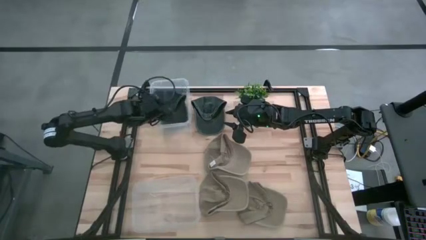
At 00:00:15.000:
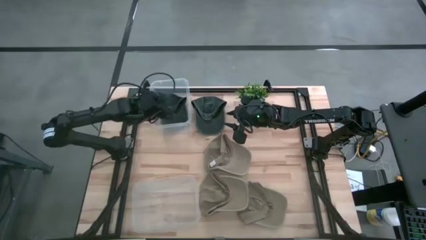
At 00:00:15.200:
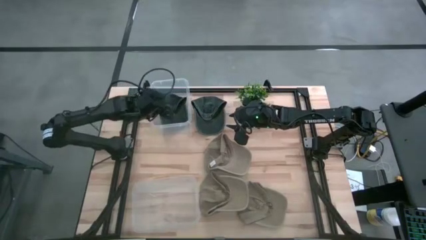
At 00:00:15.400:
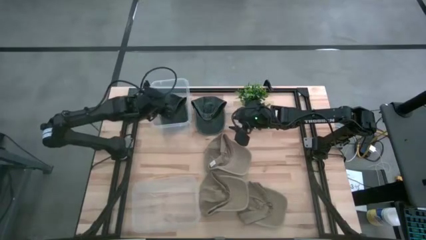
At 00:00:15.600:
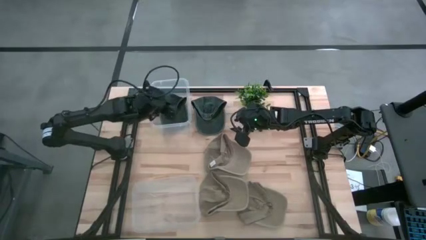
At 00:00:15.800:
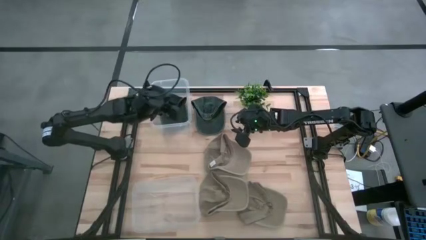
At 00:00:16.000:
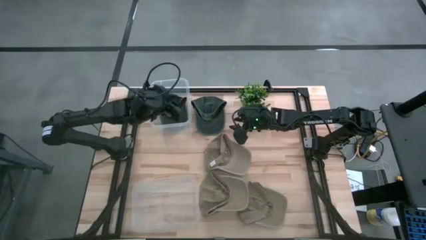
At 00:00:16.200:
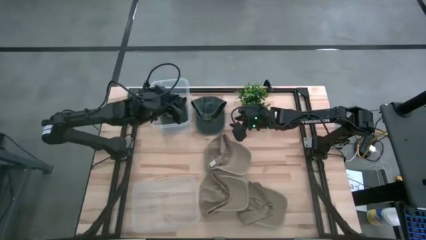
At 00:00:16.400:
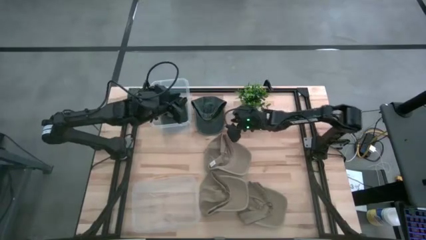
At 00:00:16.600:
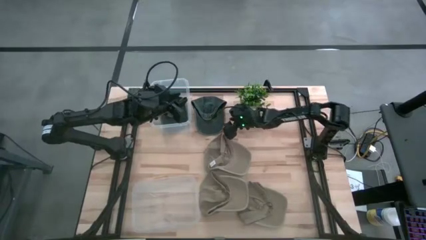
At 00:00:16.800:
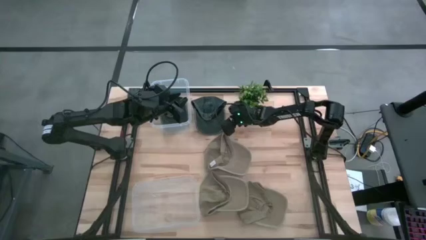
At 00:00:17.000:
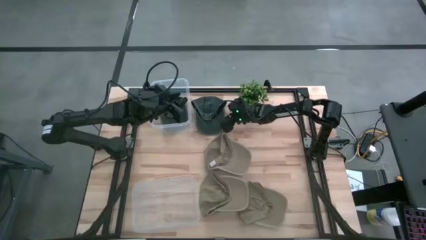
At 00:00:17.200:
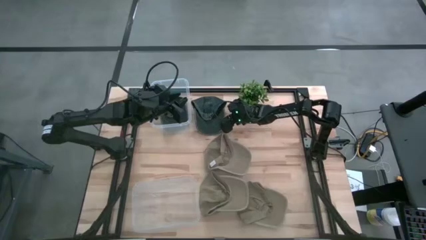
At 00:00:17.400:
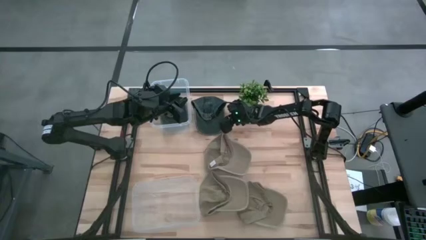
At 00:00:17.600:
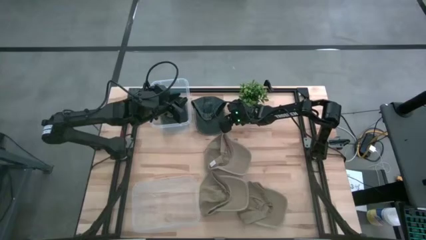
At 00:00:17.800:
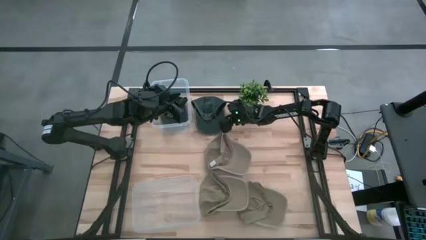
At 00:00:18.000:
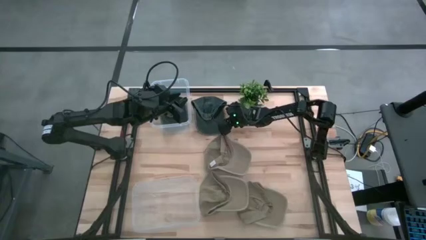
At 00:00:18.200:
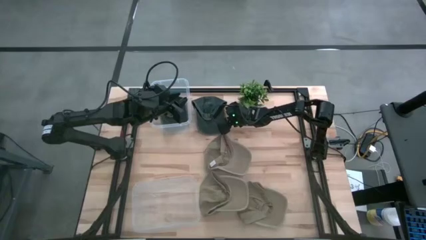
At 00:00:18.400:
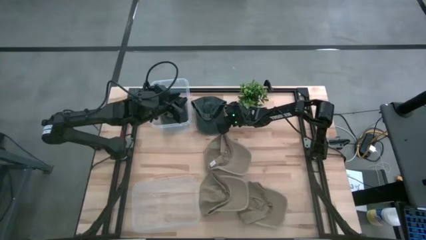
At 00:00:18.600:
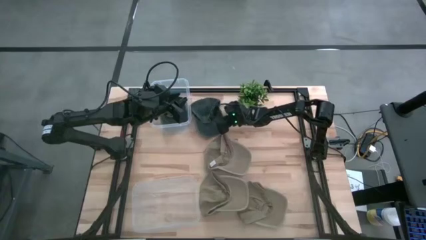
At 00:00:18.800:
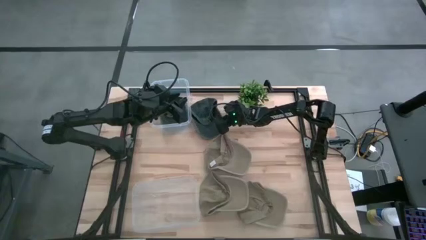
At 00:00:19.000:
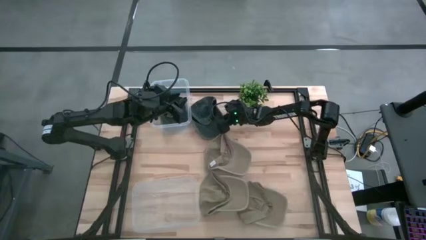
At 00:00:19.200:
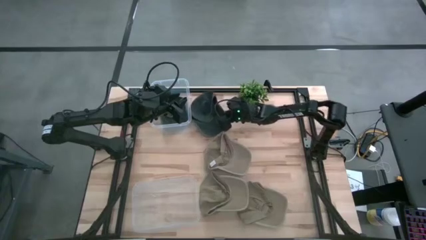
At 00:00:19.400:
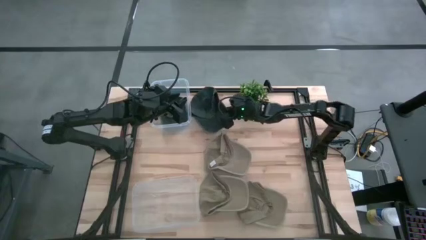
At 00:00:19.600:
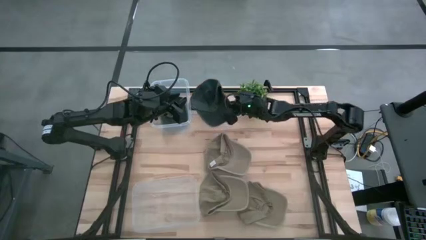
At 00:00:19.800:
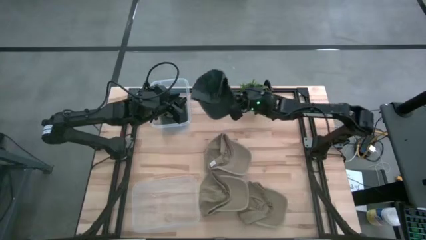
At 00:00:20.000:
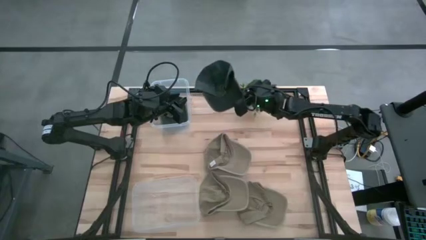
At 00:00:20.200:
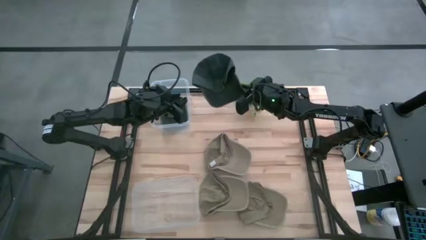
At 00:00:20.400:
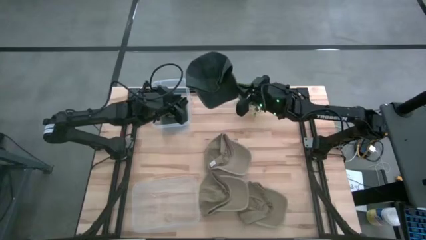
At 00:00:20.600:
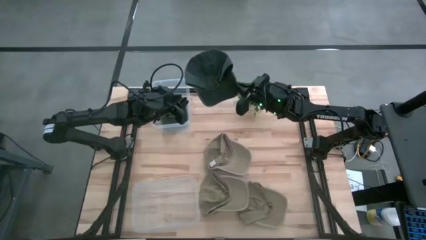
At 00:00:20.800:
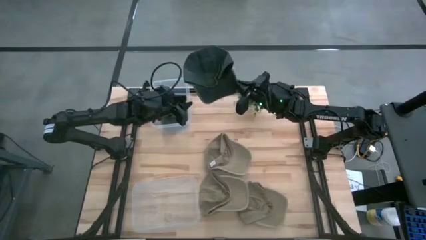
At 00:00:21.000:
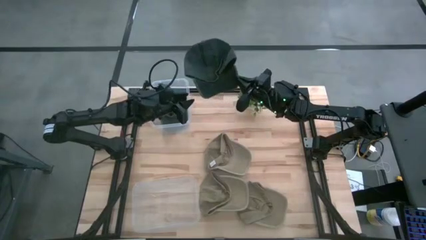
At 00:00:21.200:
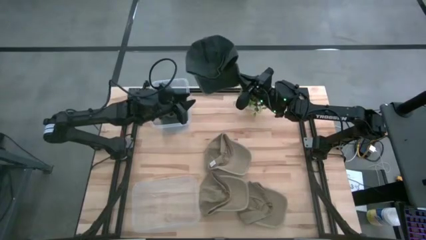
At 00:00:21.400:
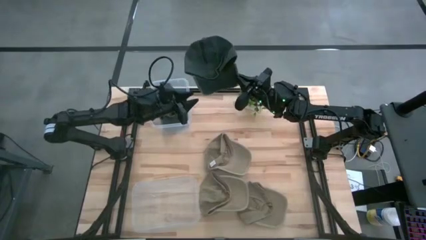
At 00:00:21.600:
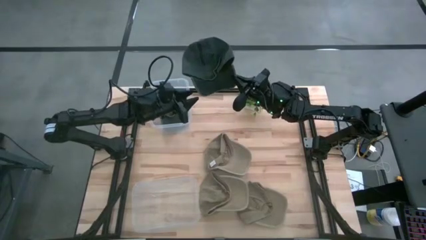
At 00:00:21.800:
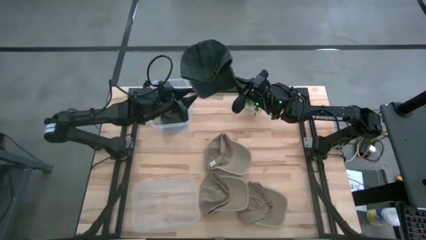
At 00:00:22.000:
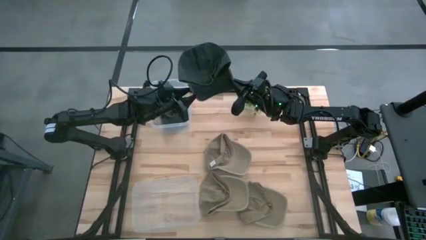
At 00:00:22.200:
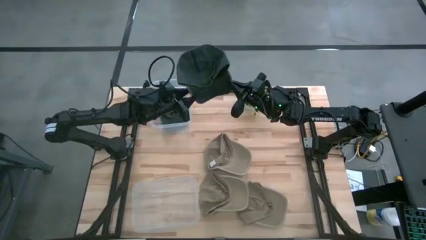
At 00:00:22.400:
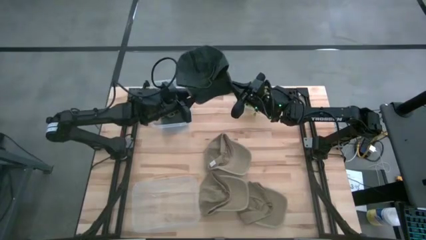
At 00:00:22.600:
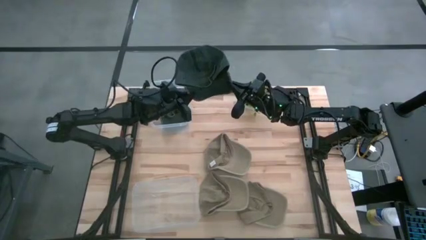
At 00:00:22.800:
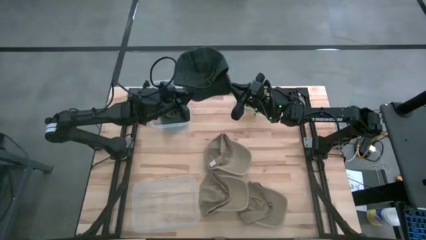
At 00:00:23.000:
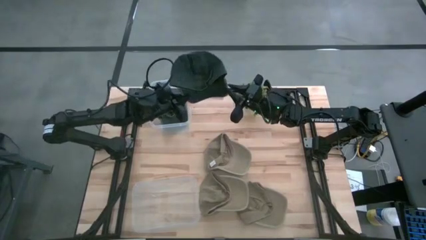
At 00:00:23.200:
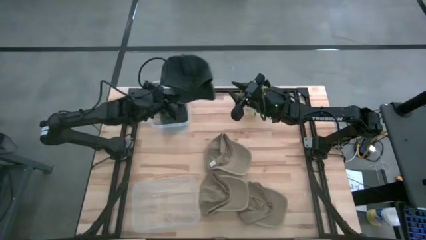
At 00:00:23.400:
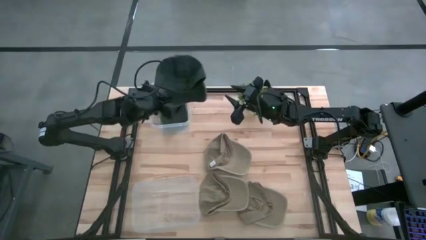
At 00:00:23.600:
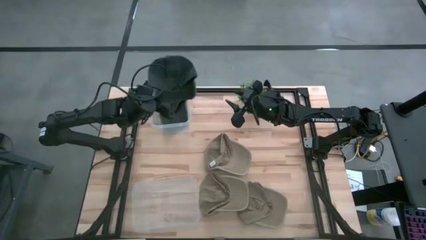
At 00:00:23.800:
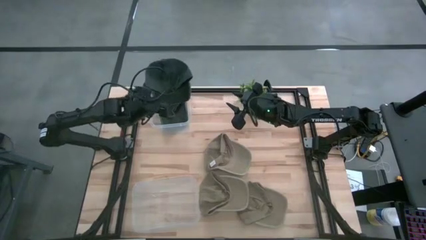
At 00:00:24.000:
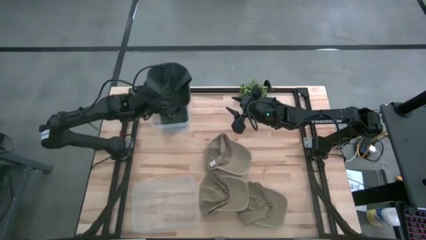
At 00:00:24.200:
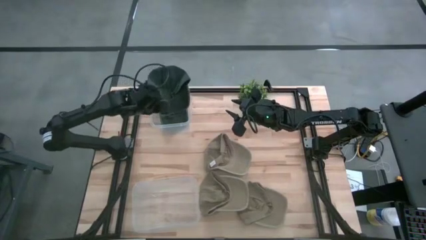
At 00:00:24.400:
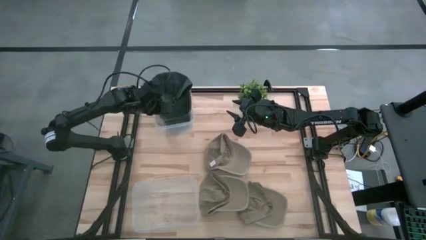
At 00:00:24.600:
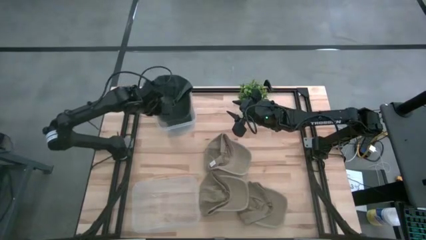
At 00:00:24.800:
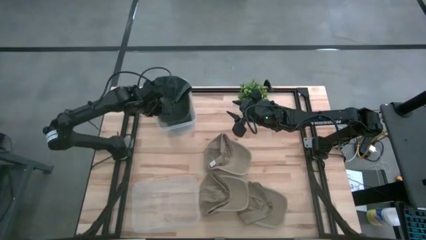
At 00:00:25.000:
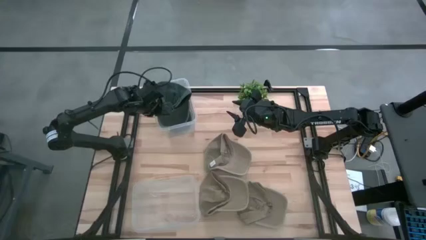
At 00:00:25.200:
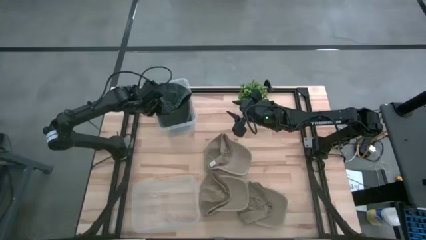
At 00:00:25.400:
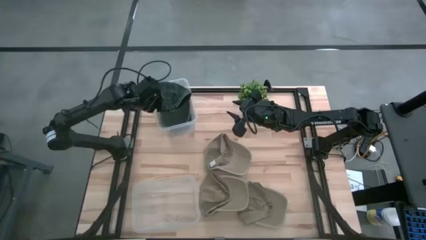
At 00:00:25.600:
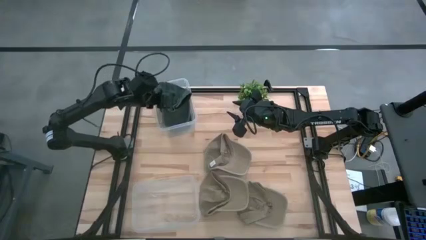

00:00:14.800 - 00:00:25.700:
Task: Pick & Place hat
Put the black cap into the top transparent bin
